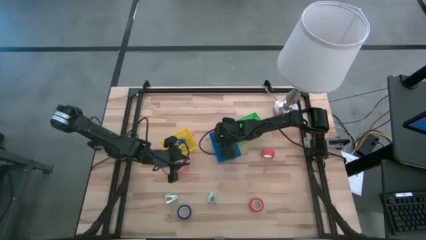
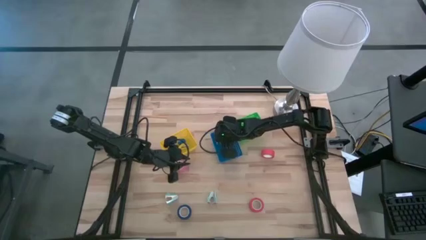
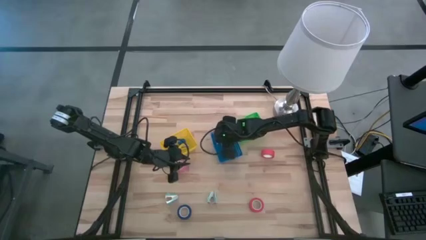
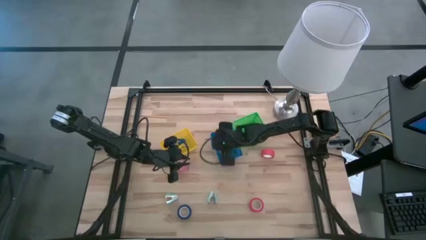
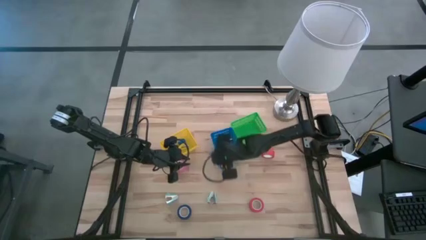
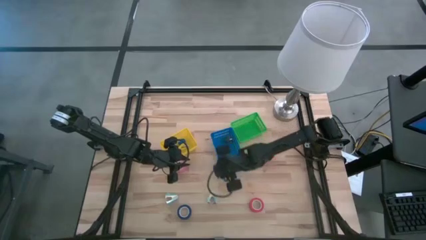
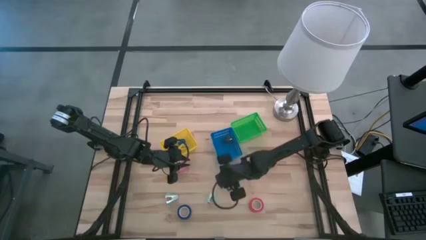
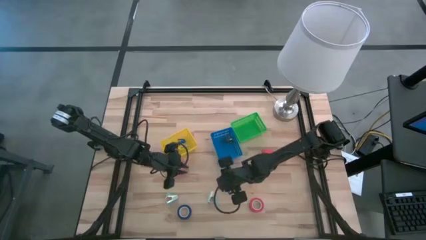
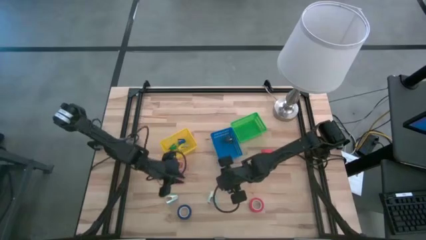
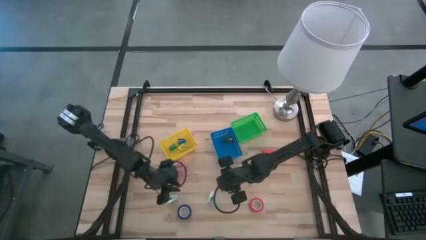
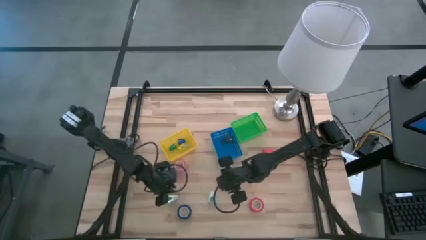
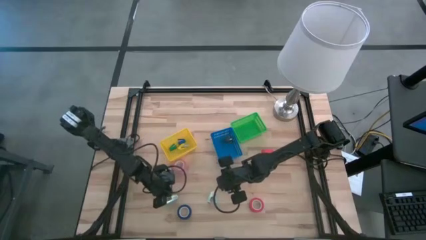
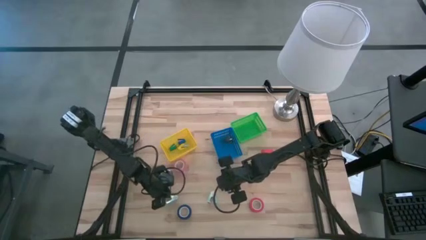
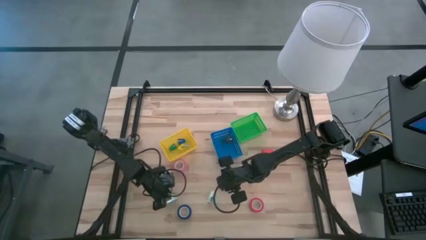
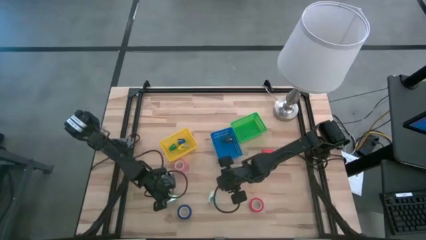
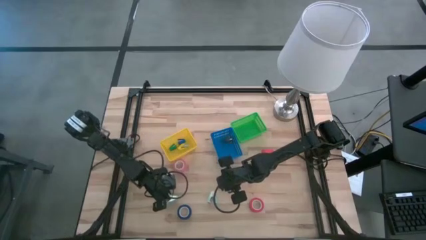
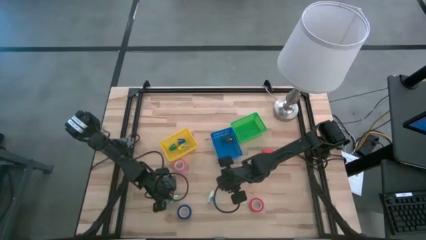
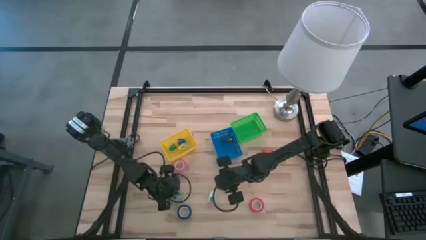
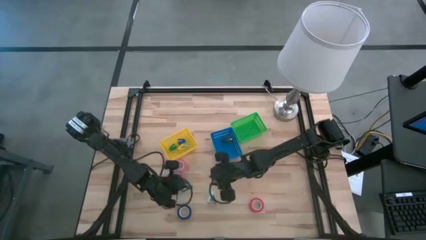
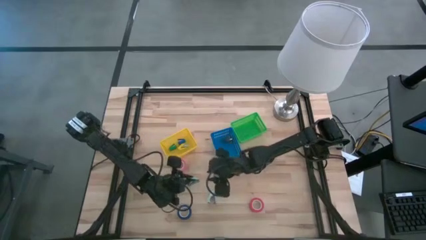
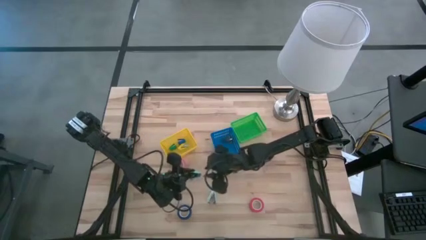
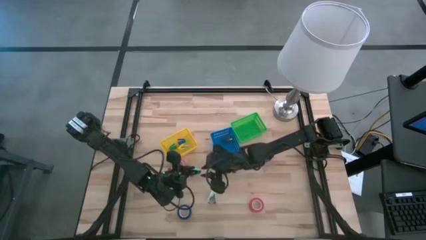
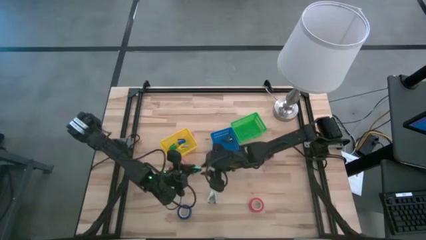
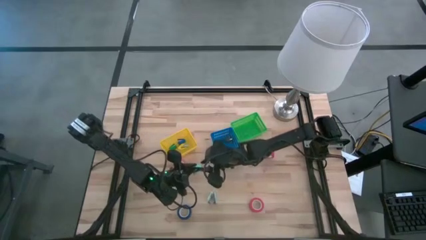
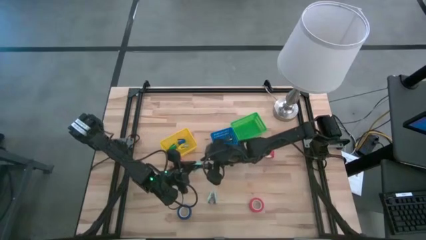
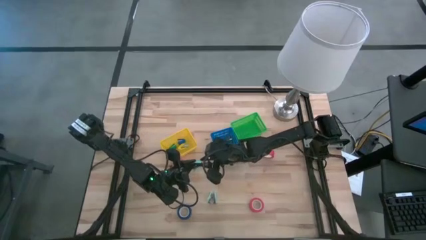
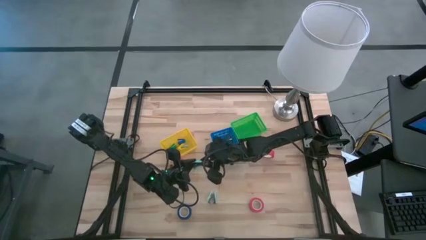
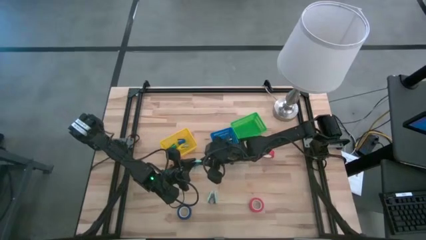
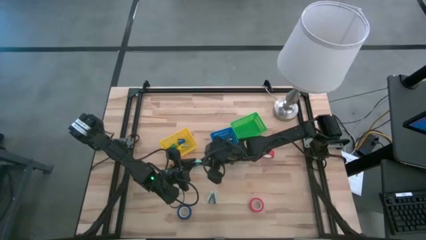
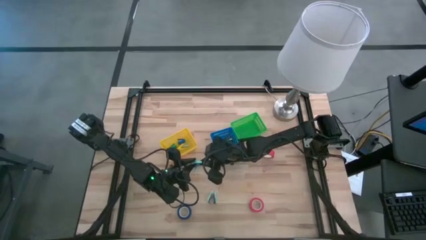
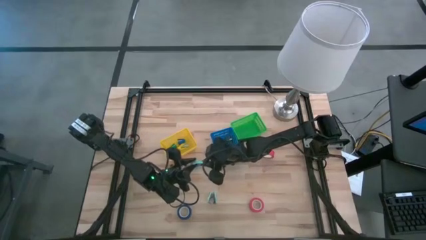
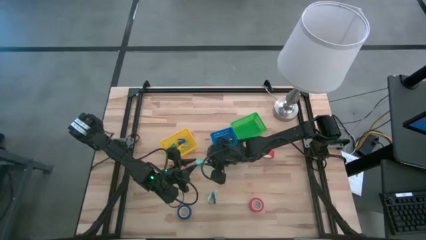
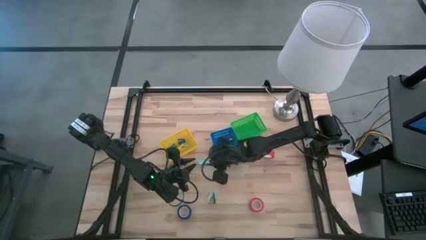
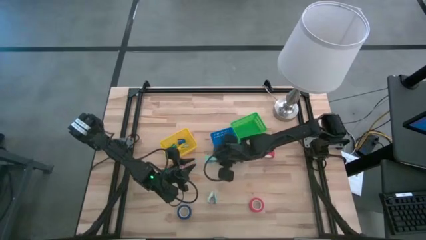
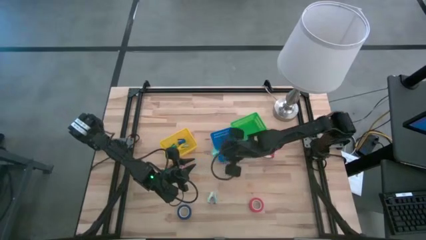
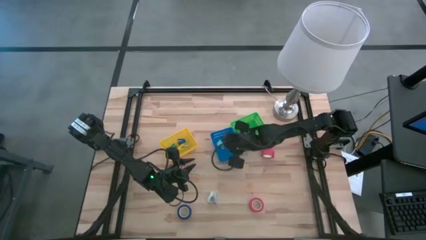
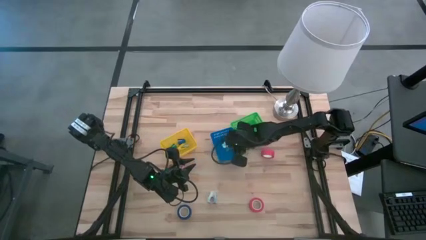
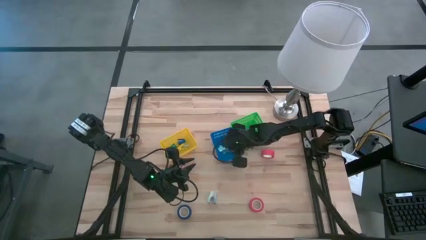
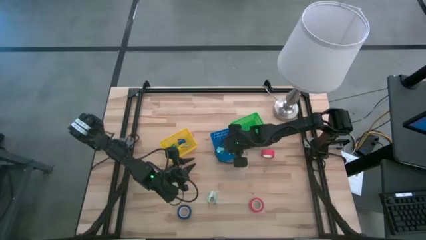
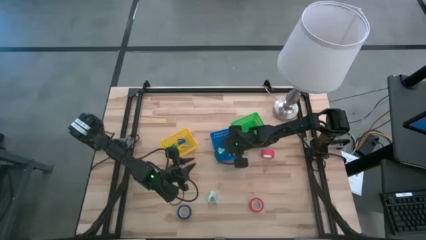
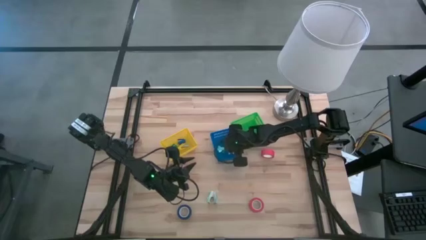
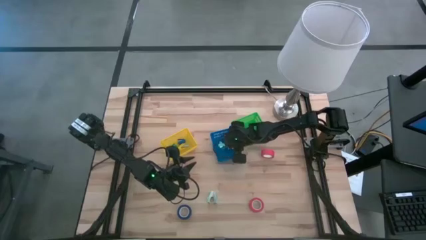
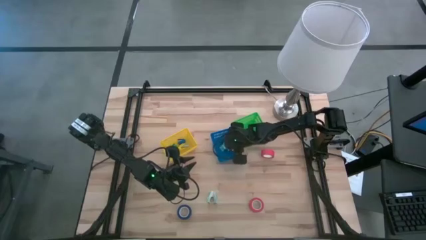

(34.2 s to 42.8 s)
Task: Pick and place Stapler, Stapler remover, tape
Put the left blue staple remover into the blue bin

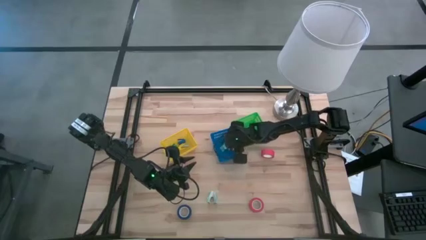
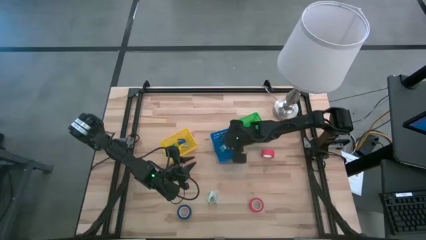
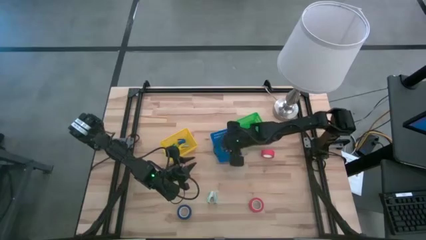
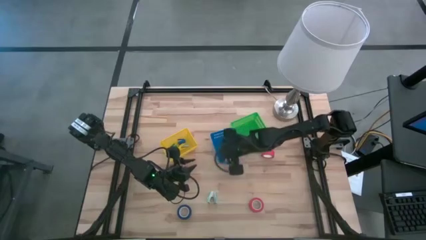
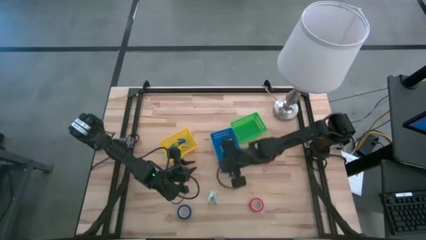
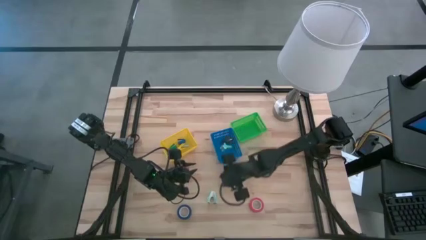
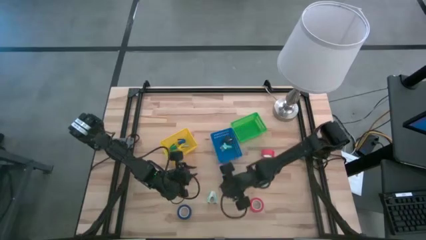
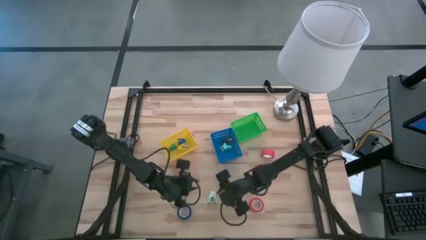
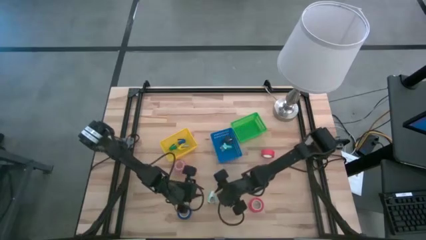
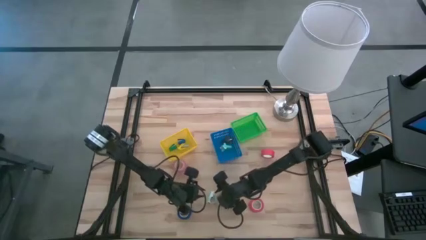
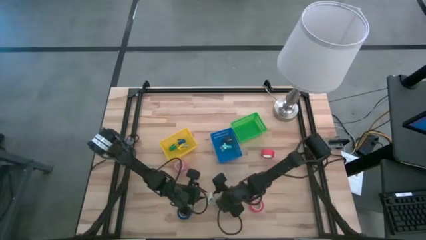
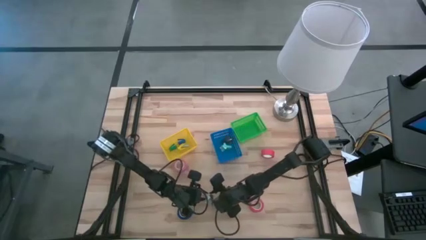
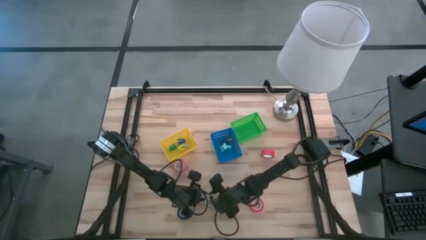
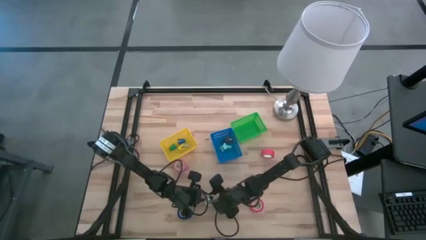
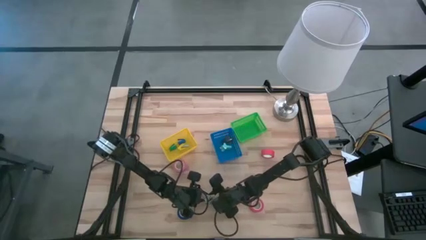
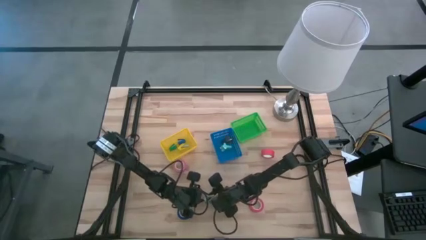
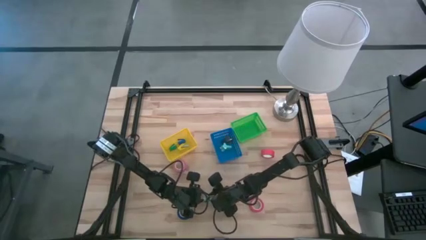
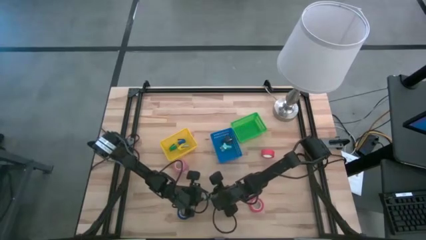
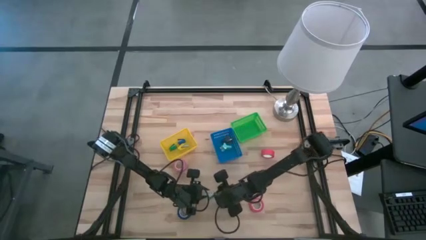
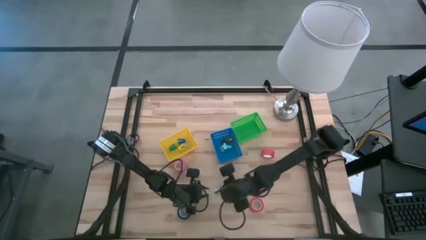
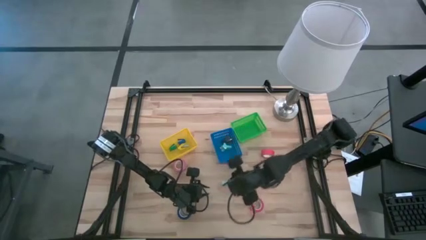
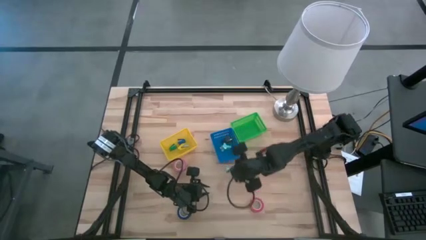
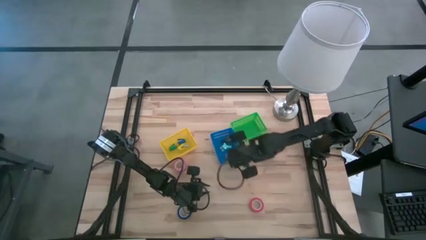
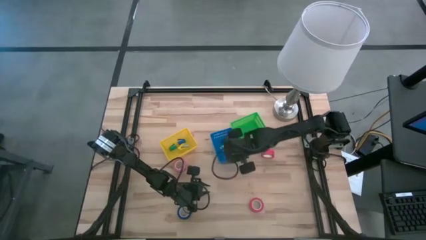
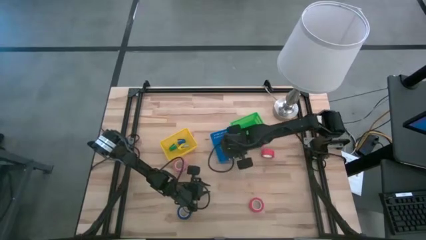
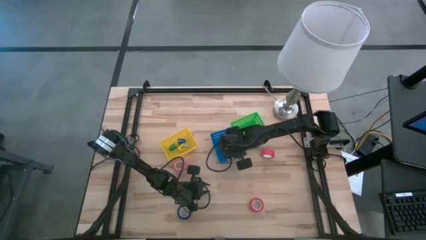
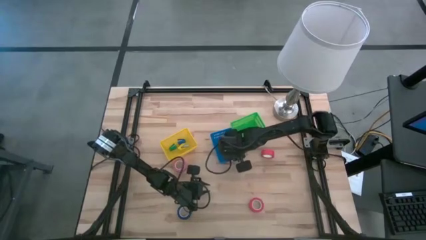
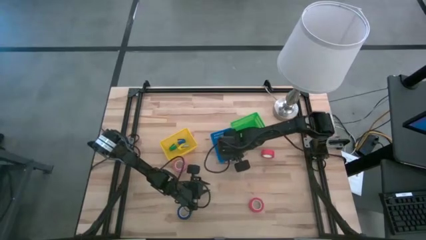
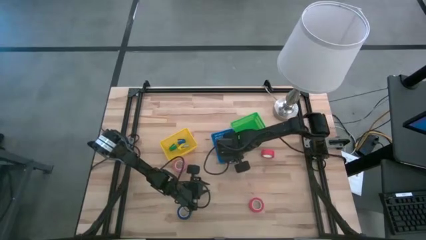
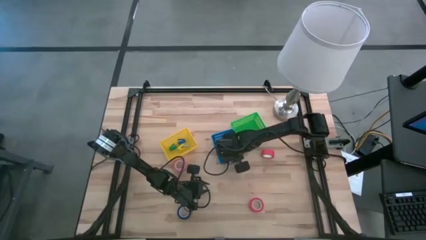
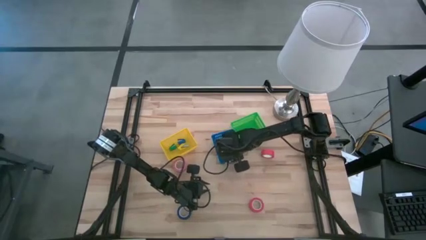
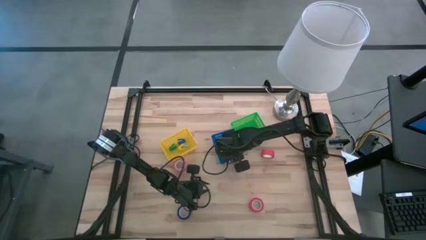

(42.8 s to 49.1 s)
Put the blue staple remover into the blue bin
